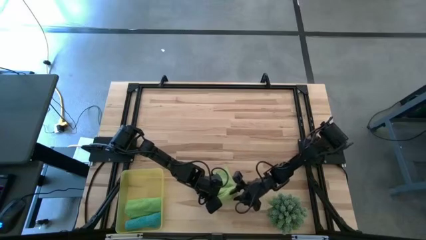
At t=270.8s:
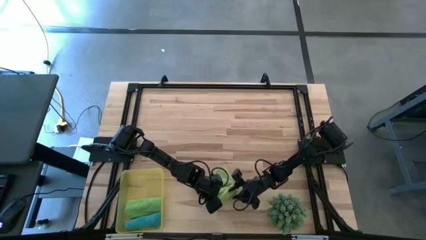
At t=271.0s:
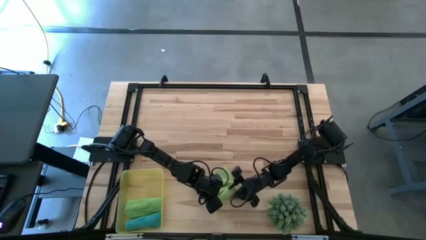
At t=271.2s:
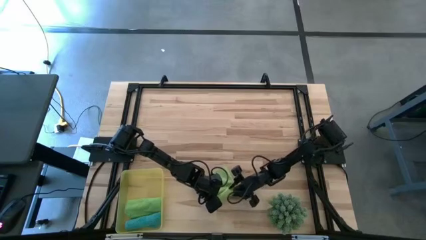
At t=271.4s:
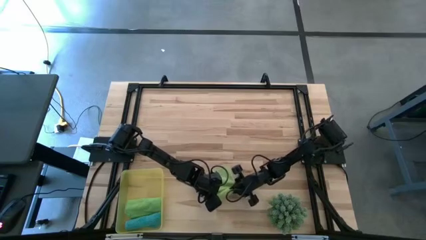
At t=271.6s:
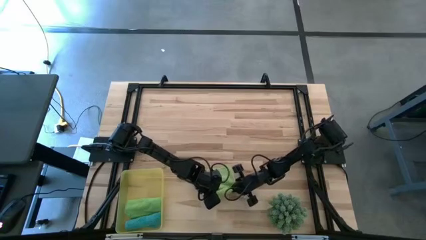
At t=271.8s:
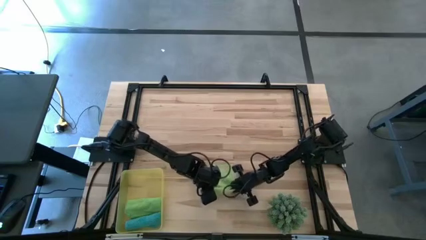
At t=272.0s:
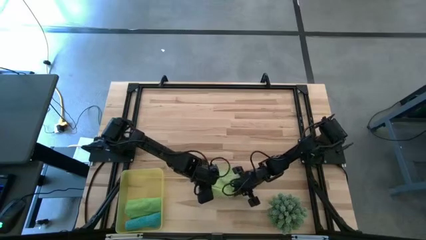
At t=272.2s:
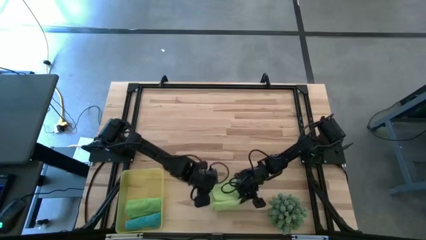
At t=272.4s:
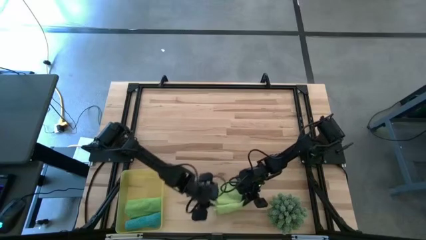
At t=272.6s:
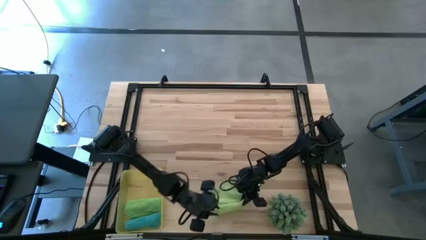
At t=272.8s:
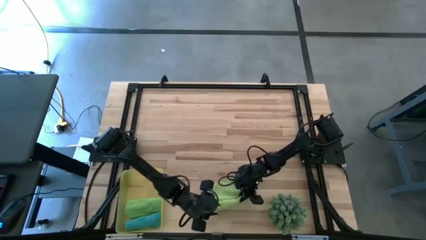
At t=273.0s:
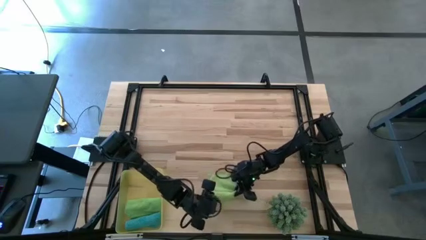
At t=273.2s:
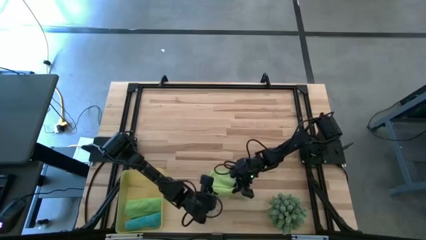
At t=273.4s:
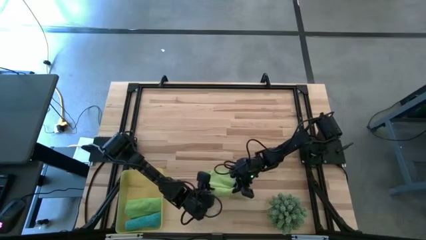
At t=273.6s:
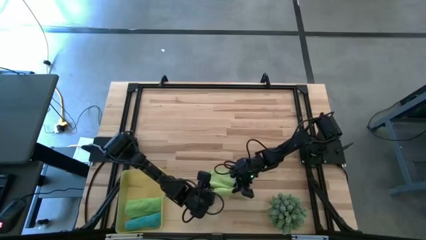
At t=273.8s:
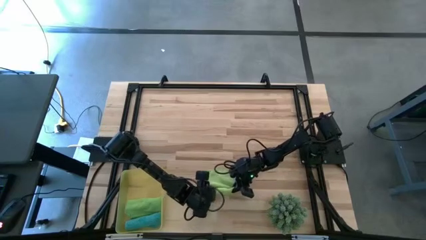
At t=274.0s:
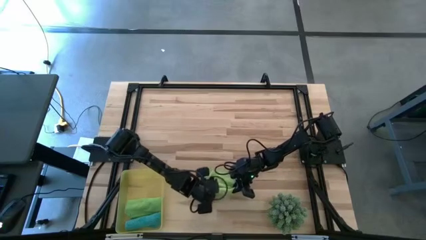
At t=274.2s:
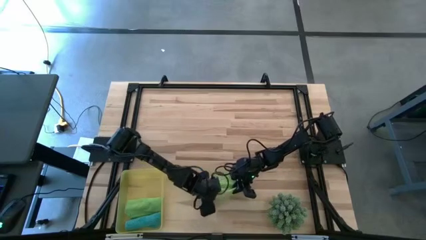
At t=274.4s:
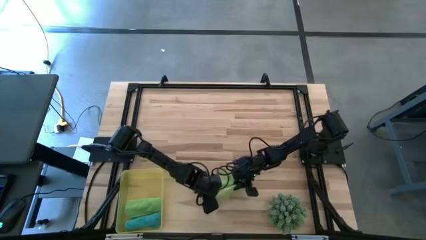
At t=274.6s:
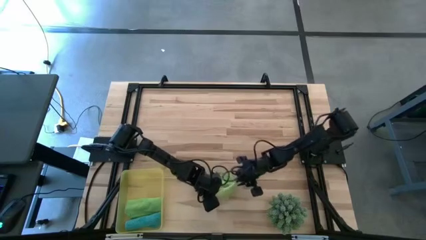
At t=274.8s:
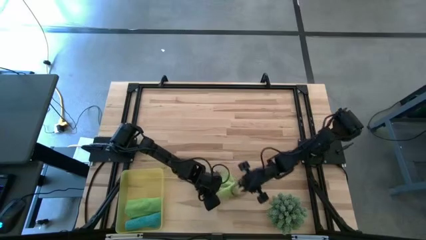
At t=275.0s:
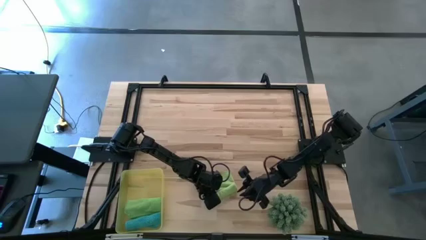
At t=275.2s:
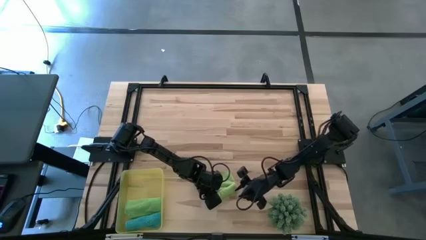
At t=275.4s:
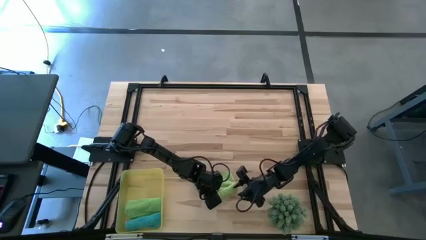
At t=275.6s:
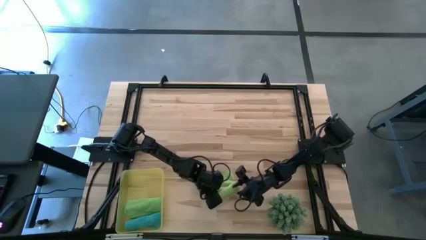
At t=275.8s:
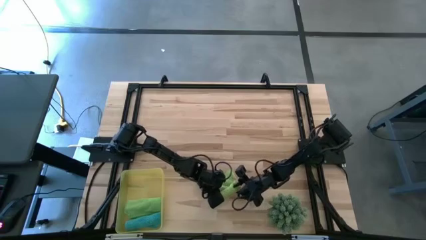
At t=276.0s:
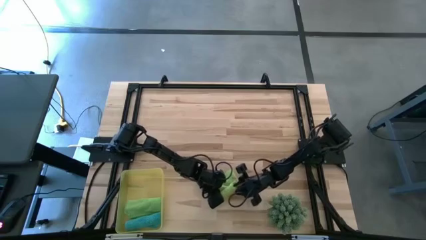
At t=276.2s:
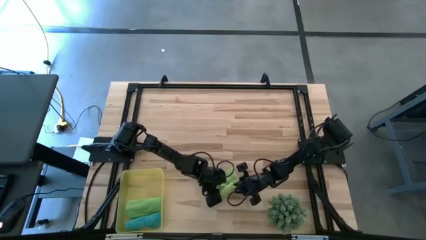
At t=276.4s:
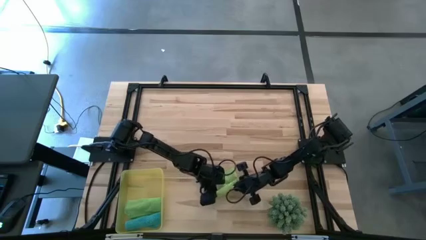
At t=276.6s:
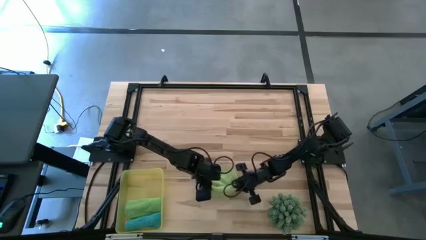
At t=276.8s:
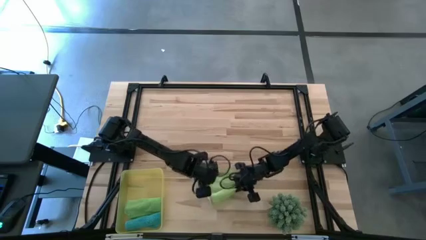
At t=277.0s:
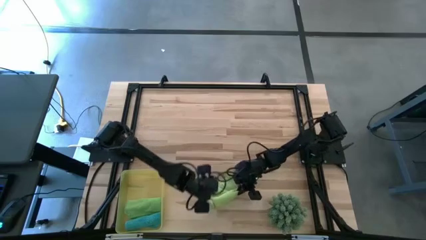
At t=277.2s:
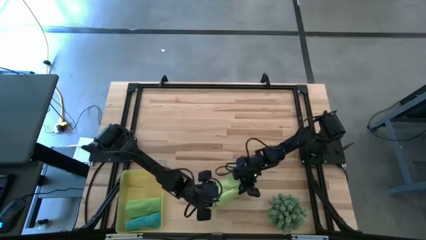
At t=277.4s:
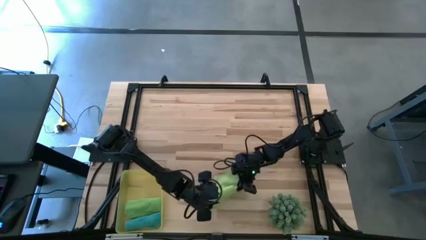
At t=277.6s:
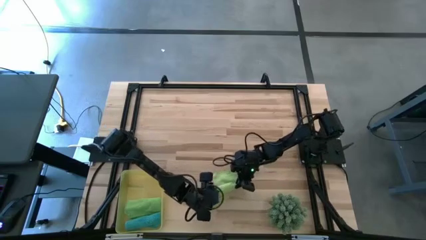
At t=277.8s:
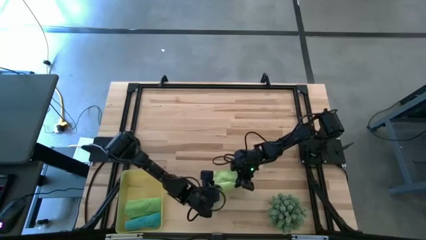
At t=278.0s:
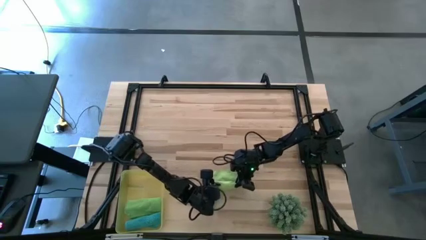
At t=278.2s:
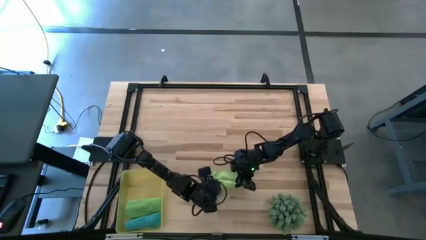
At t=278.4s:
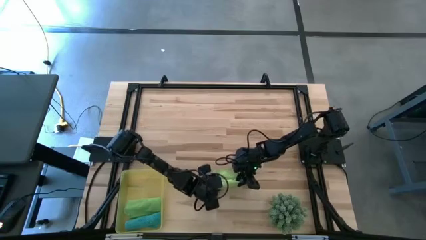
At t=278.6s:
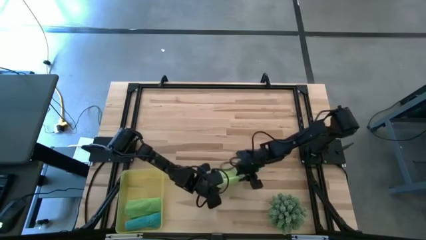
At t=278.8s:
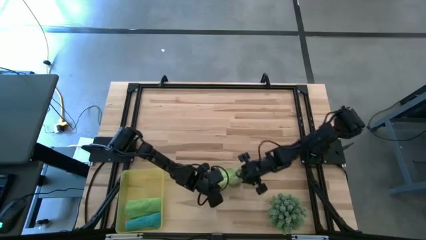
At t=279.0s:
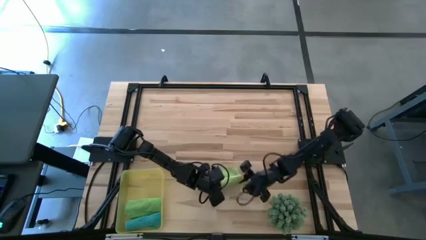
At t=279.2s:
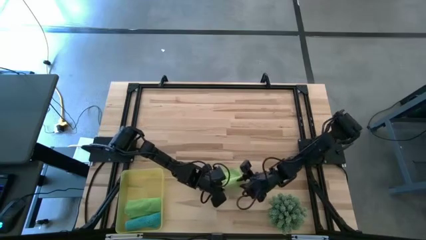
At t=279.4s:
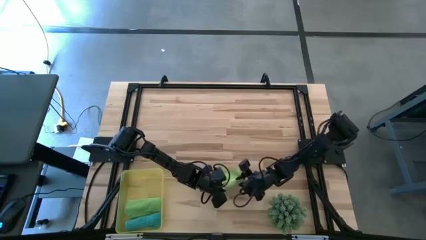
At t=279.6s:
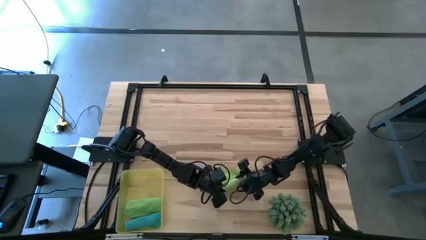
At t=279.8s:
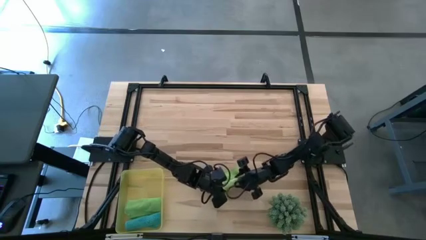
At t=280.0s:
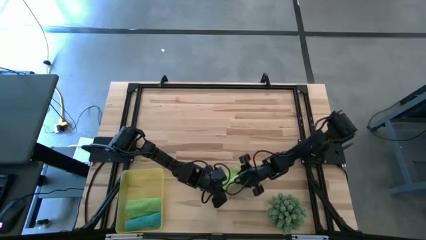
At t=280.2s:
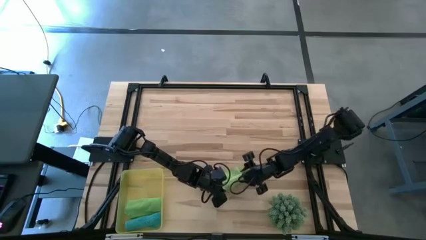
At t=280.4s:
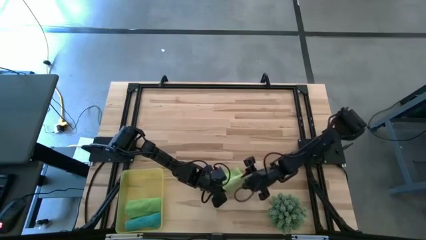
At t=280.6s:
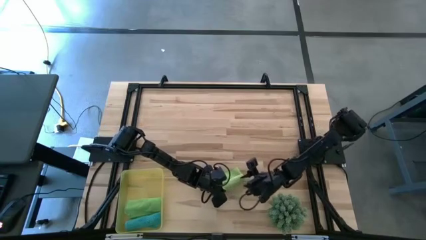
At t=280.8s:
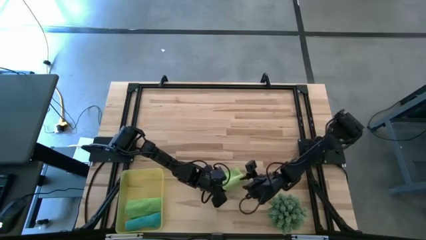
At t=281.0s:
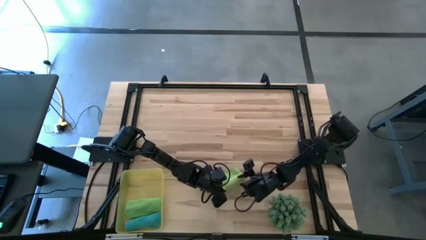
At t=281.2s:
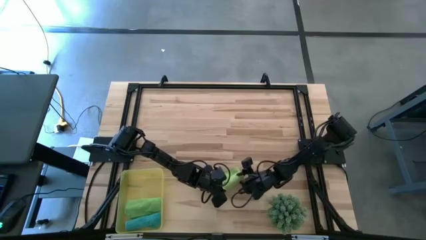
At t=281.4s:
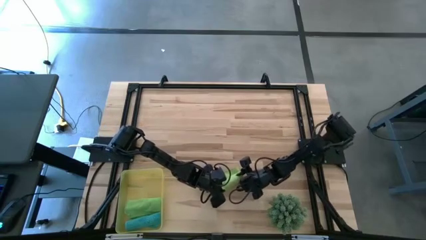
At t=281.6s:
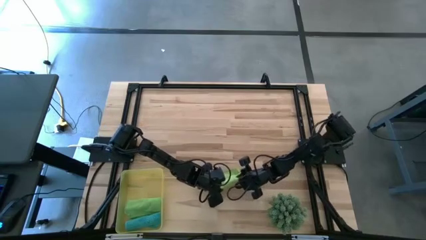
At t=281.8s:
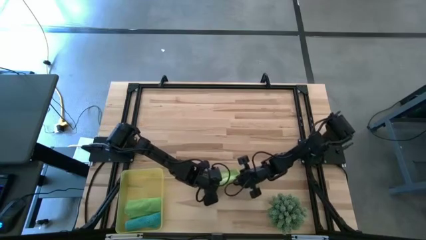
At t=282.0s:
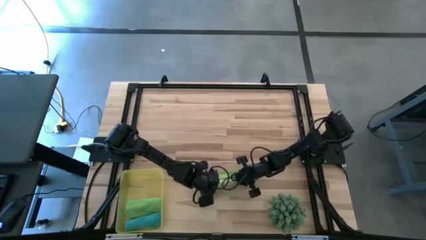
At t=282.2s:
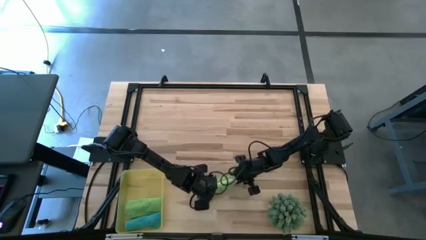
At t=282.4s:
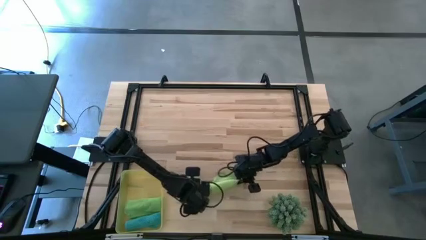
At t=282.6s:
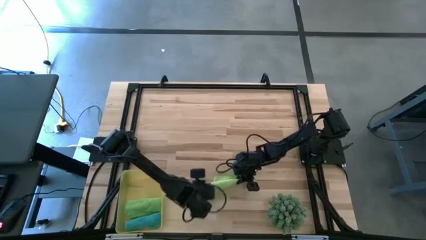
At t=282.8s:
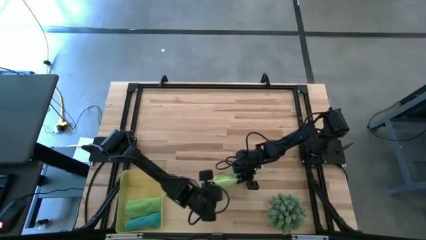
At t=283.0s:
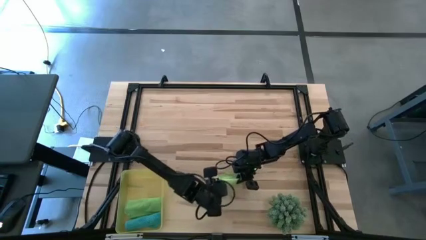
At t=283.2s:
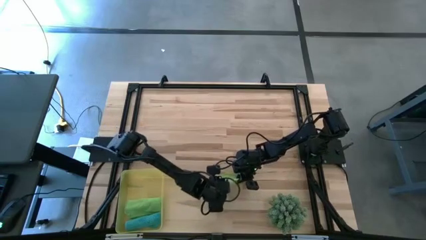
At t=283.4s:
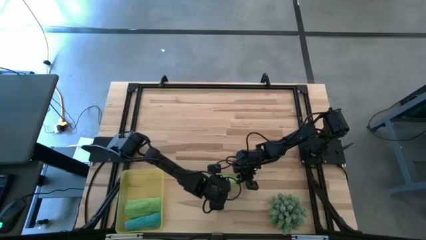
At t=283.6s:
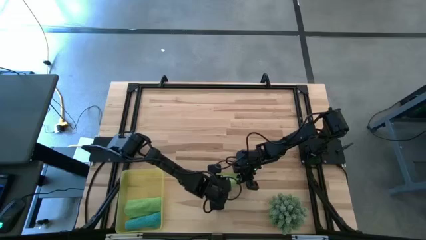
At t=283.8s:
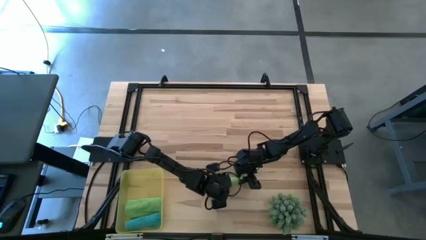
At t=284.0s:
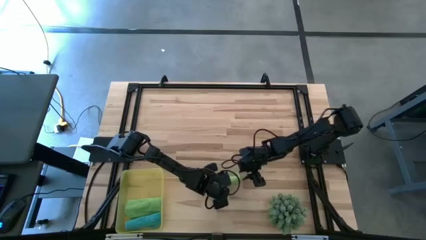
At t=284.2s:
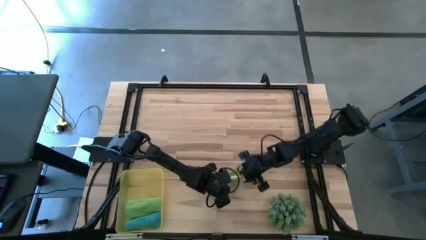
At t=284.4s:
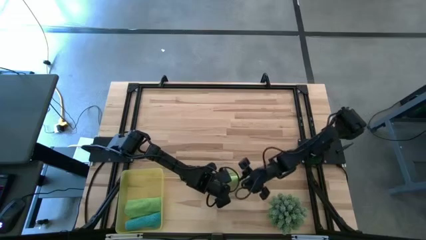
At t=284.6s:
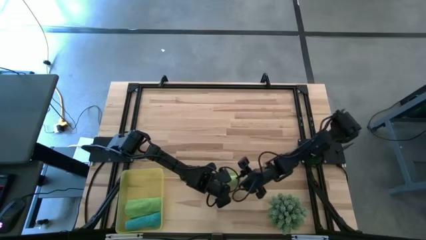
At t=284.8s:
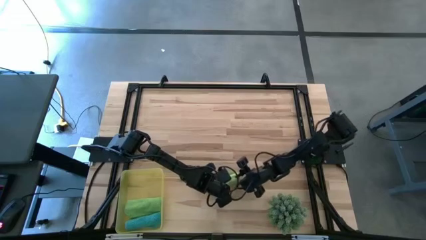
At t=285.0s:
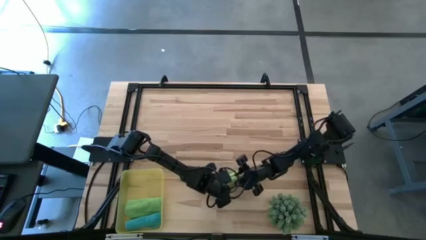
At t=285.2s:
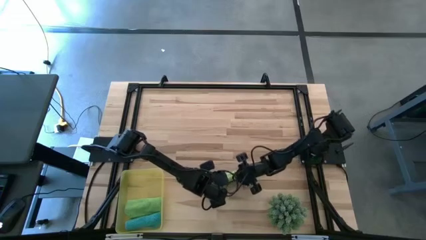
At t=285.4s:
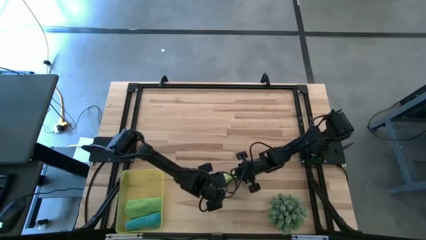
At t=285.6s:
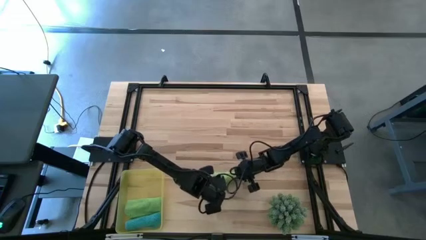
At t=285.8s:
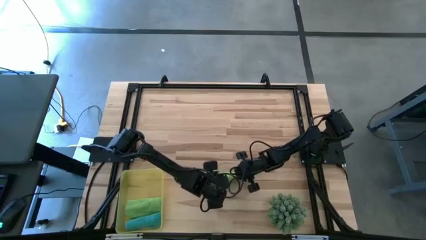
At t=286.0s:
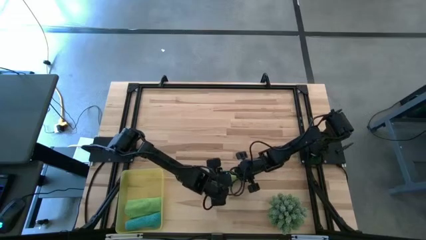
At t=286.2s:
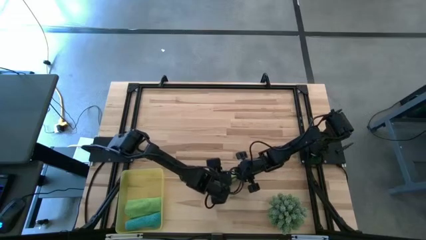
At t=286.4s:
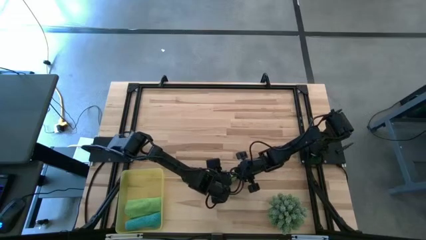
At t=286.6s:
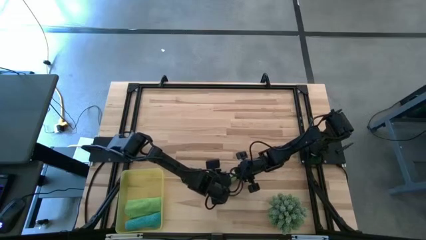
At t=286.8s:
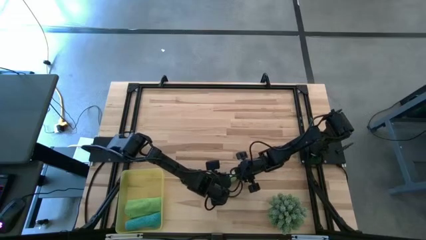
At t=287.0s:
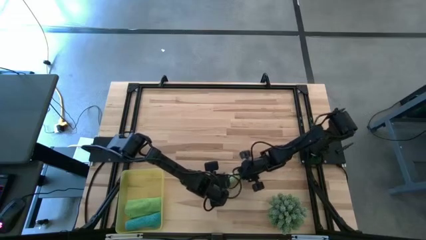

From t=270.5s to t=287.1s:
Task: Roll microfiber towels into tight, uniform cylinder then place into a basket
Roll the light green microfiber towel
